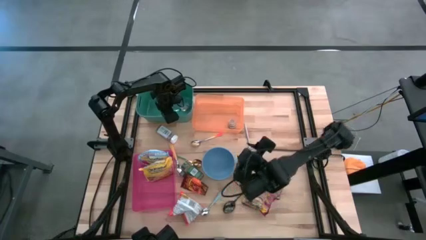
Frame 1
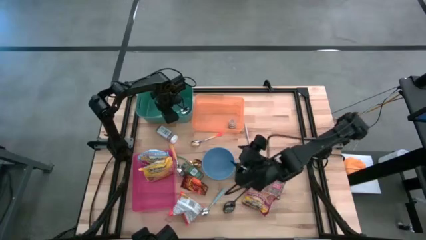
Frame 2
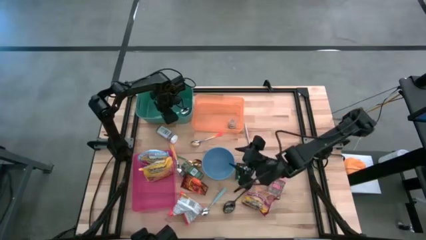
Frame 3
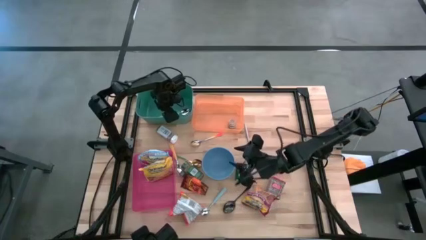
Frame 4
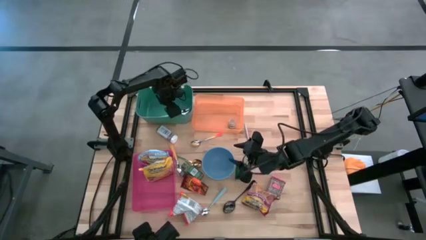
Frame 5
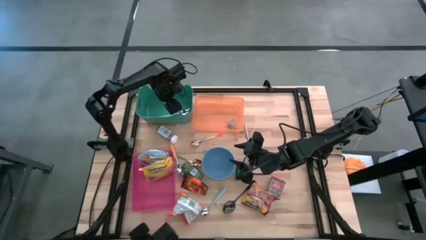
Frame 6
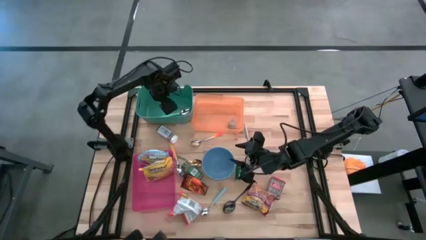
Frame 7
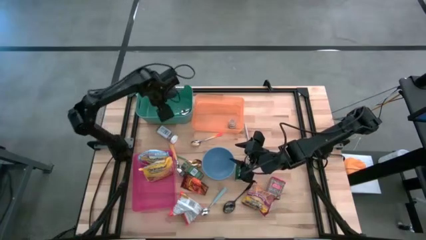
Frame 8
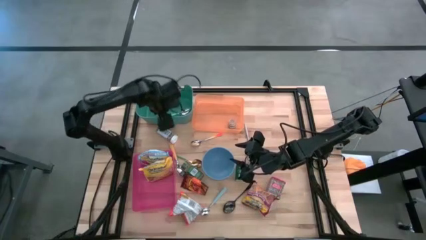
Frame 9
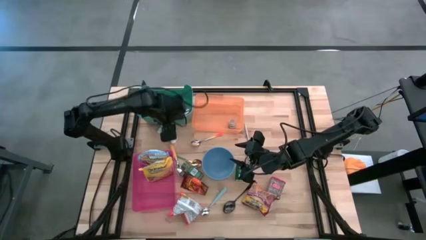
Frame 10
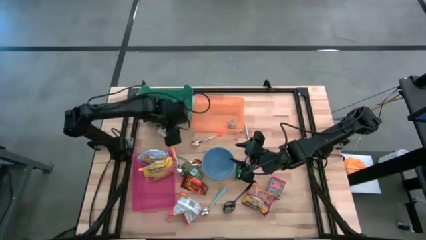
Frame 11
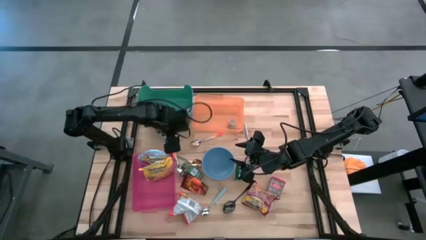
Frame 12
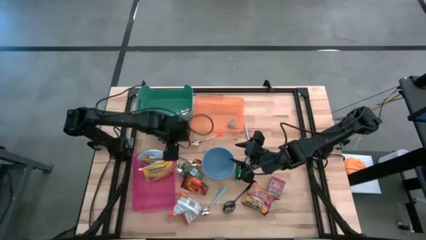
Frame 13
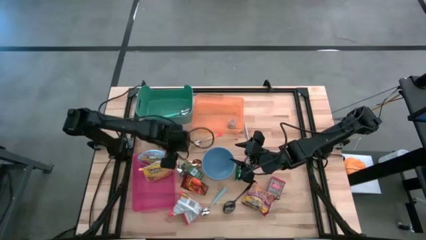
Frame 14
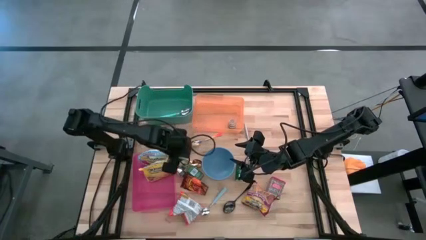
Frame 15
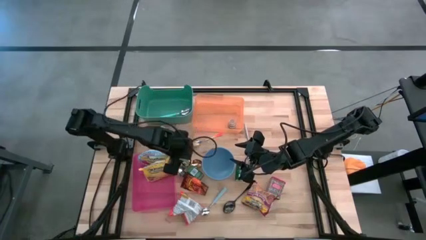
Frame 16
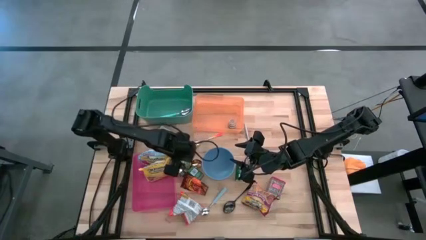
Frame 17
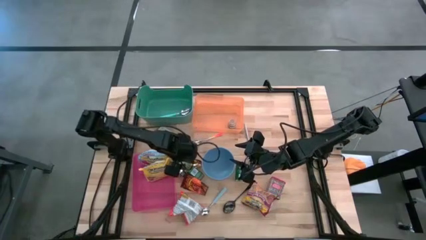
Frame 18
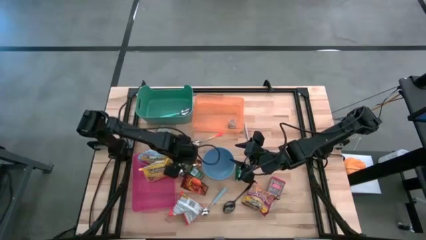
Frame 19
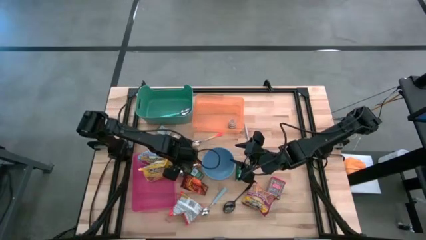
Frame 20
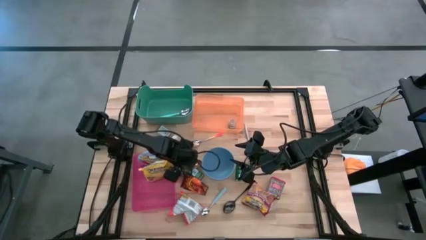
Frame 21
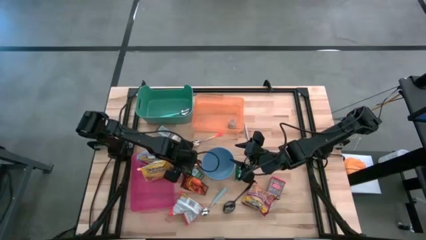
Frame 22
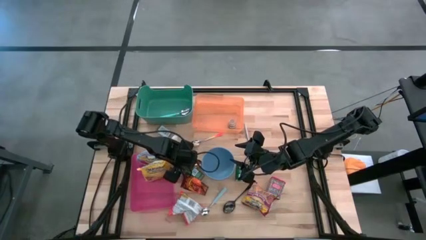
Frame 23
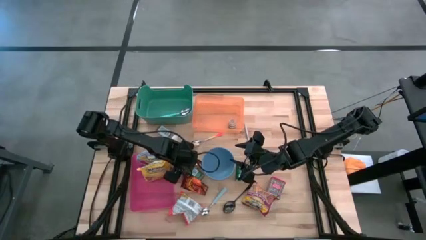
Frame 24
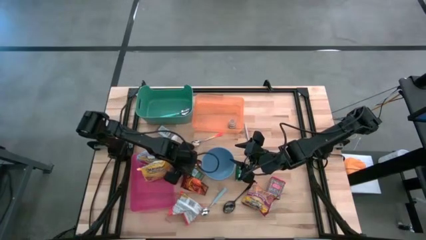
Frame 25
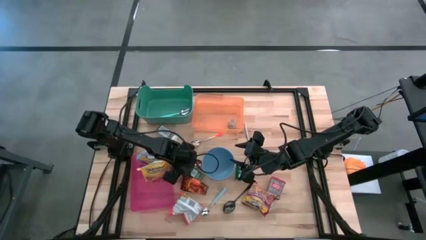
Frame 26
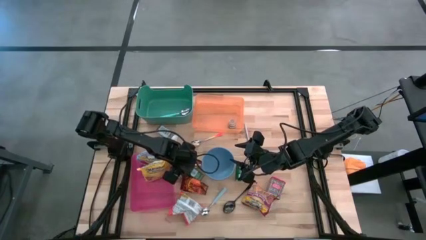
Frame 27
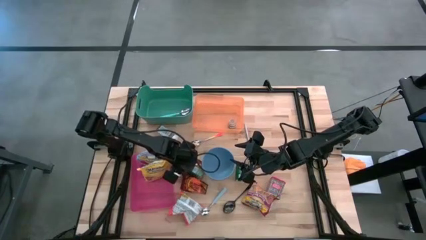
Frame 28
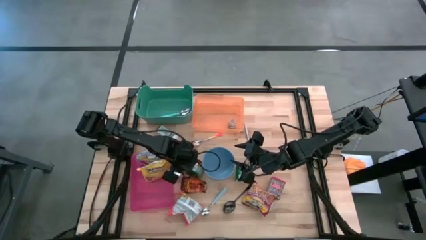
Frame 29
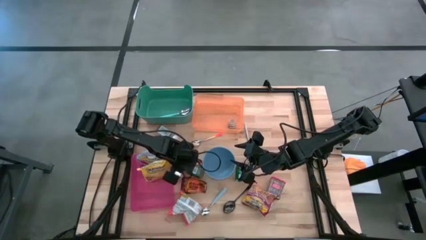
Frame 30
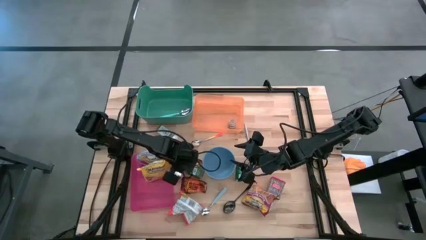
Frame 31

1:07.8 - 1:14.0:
Put the green spice bottle into the orange bin

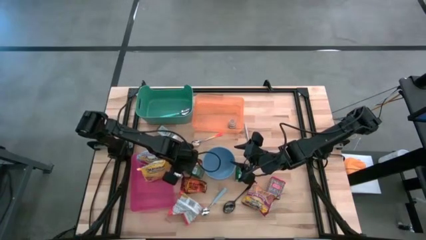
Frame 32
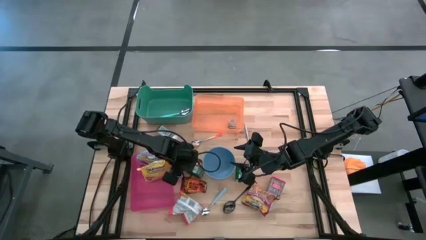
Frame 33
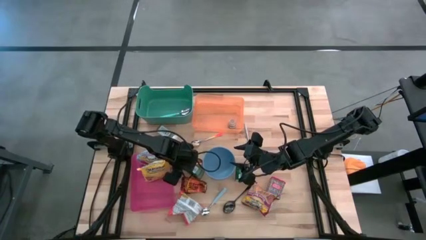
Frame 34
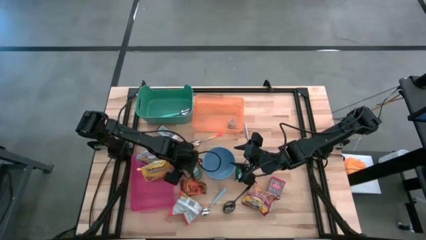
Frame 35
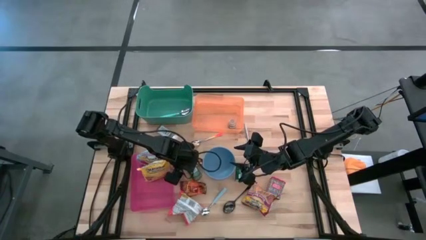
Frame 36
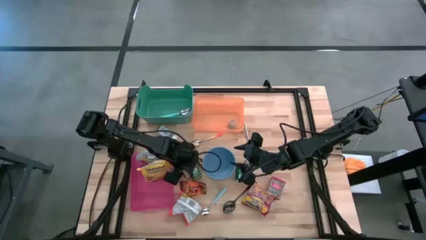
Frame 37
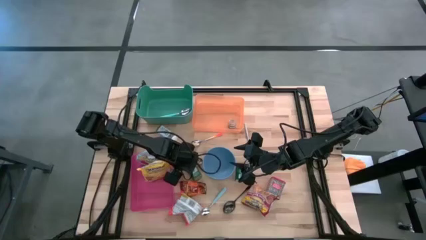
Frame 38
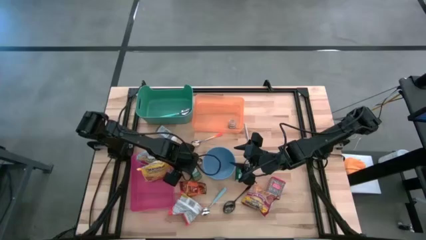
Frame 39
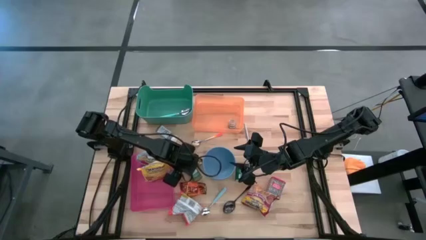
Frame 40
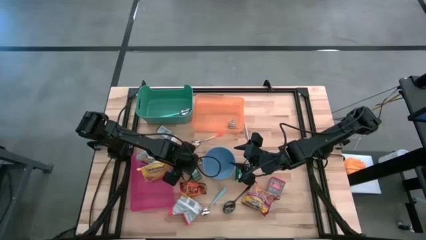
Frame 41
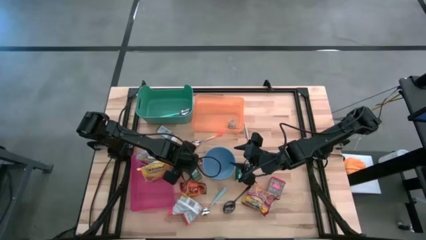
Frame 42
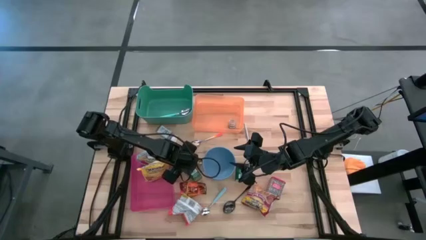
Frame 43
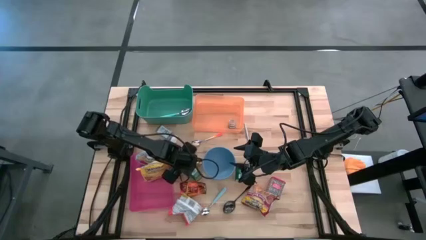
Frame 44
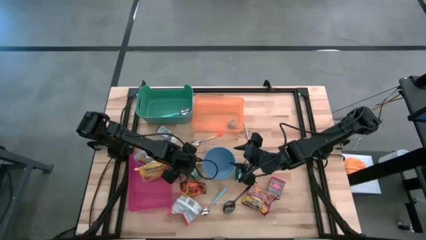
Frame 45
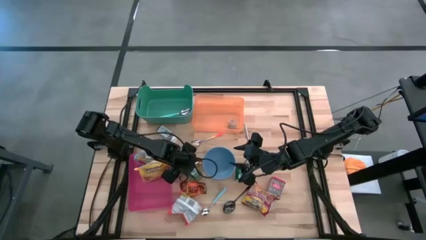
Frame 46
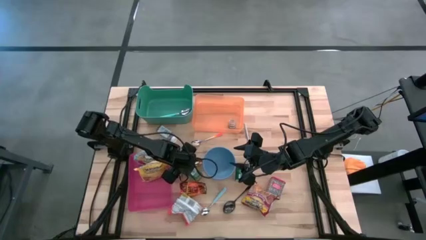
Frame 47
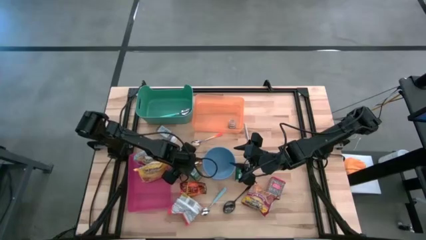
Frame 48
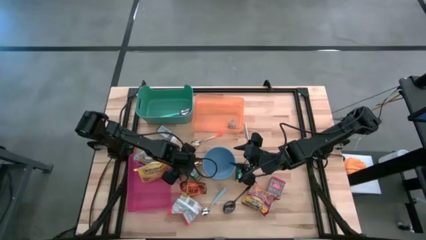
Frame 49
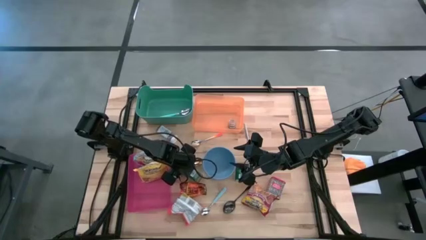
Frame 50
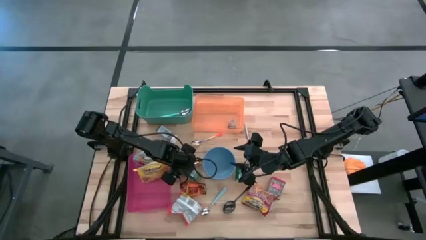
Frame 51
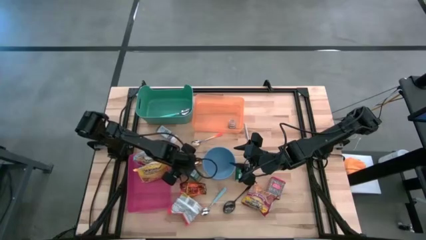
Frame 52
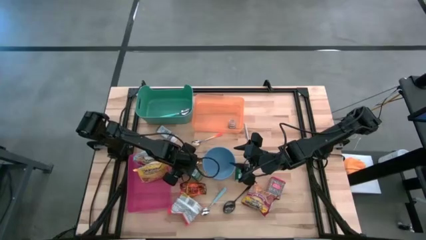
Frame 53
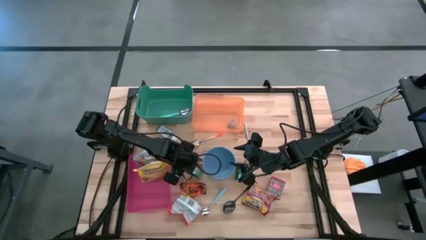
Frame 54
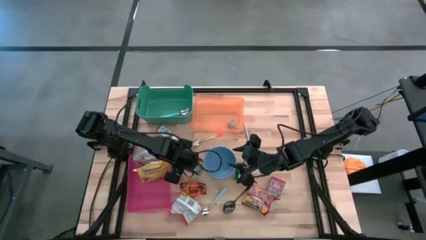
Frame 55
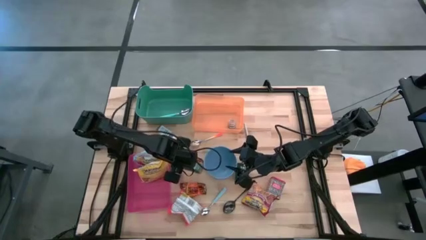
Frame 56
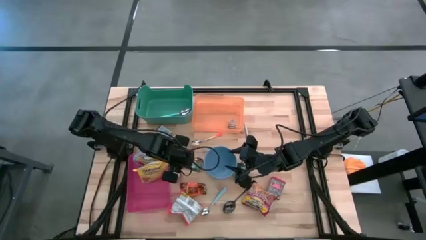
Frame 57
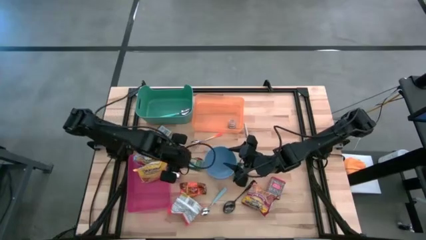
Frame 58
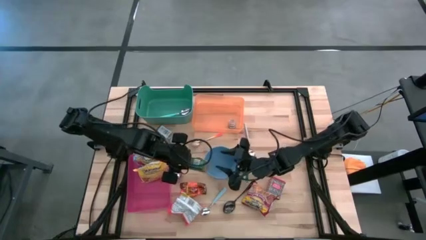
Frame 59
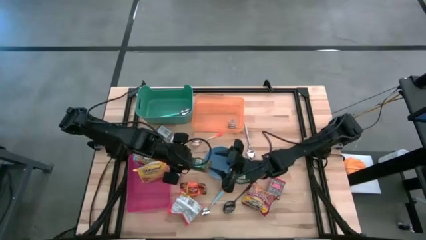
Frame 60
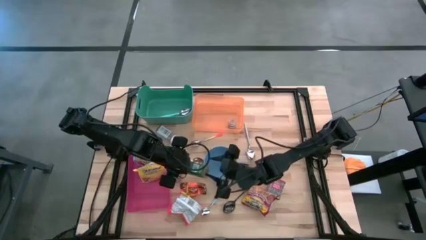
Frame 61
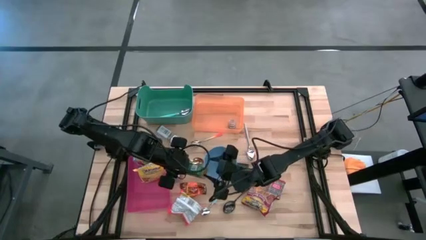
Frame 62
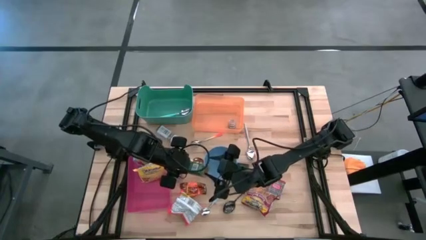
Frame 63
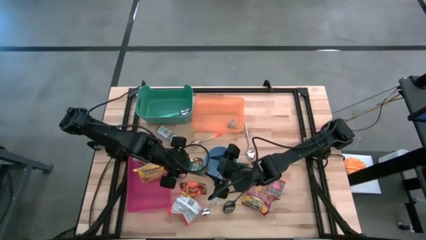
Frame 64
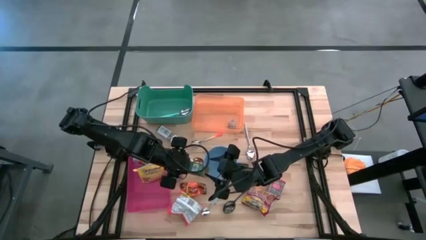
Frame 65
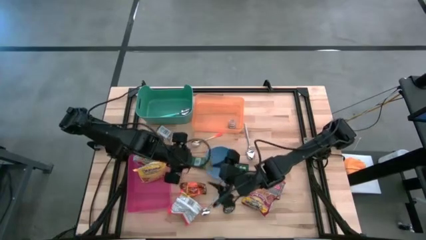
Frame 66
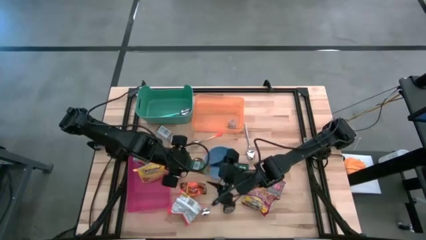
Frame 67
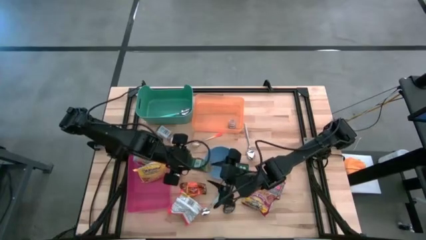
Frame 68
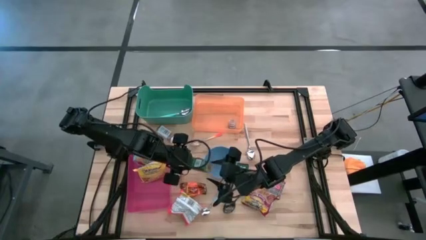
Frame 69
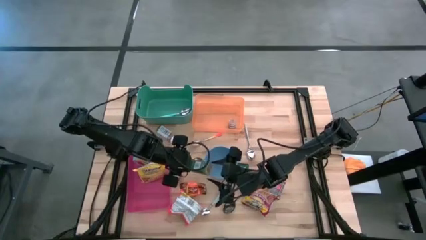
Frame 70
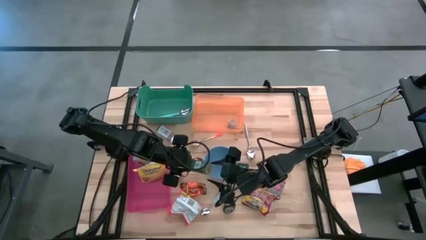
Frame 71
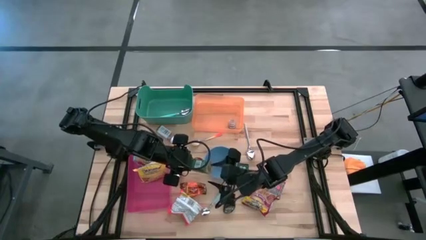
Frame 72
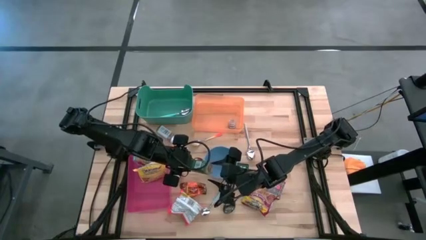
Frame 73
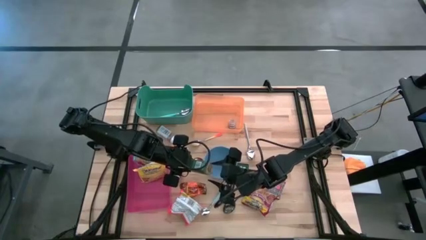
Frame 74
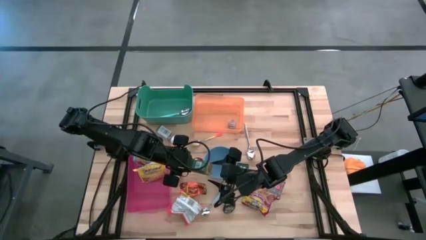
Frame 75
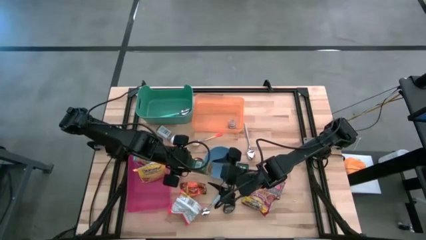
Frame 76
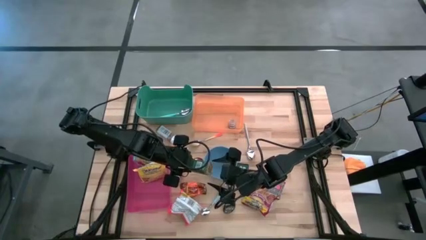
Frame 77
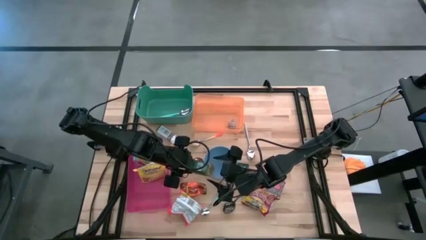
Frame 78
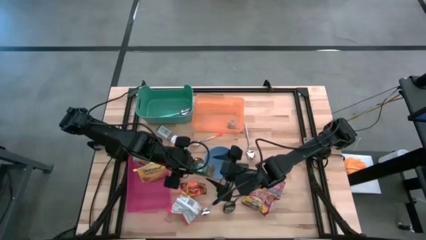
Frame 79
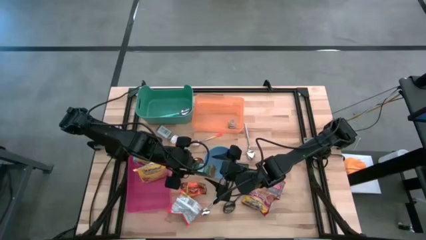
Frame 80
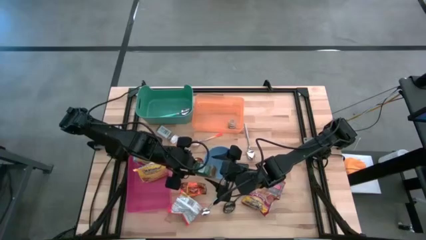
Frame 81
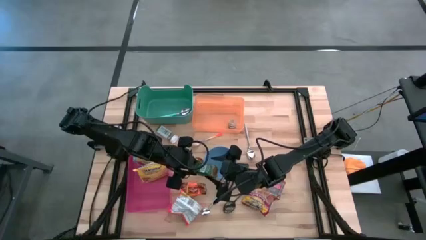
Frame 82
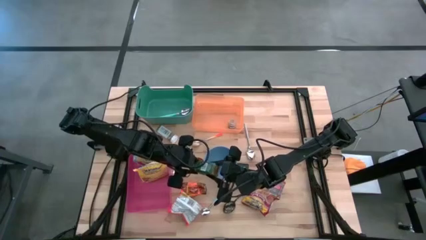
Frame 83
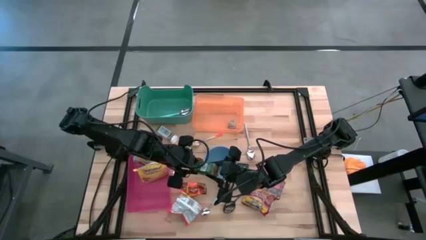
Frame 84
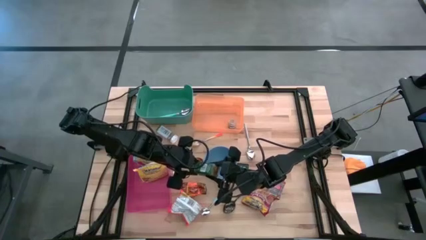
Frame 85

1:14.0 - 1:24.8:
Put the green spice bottle into the orange bin
